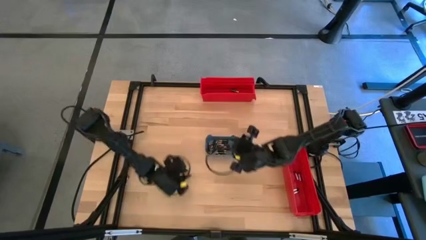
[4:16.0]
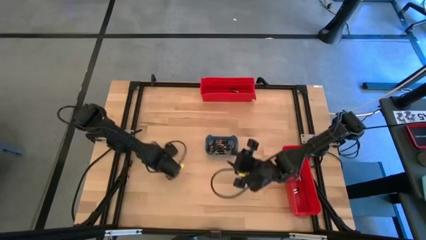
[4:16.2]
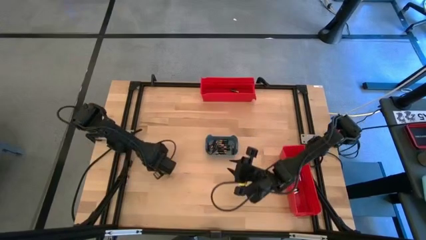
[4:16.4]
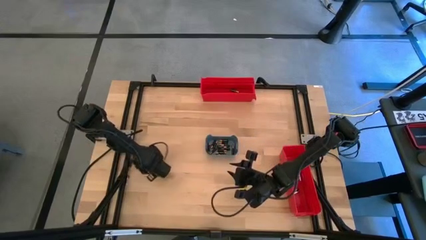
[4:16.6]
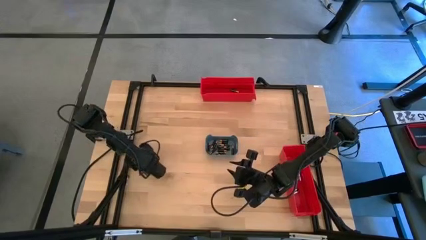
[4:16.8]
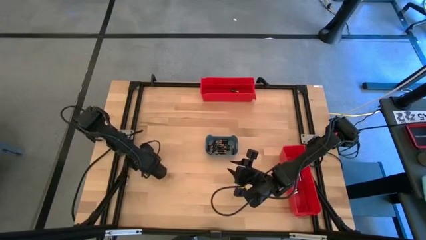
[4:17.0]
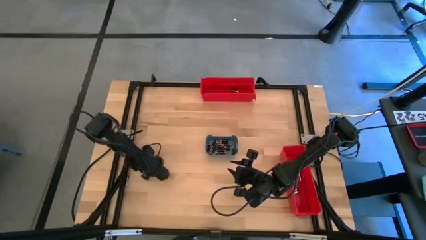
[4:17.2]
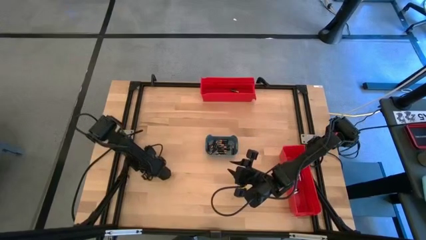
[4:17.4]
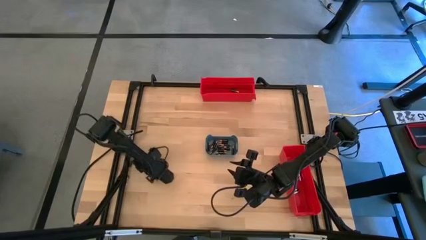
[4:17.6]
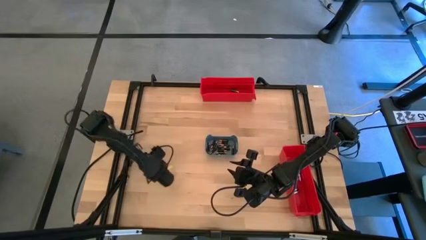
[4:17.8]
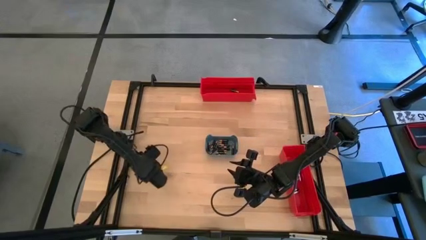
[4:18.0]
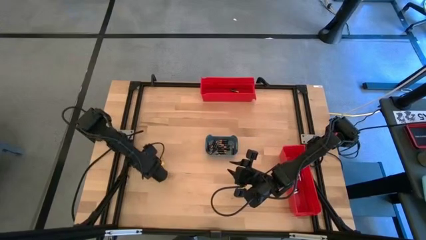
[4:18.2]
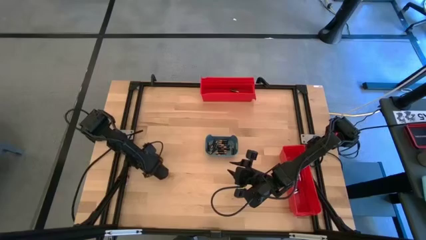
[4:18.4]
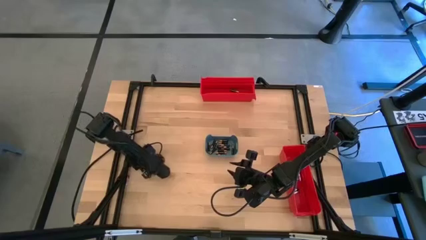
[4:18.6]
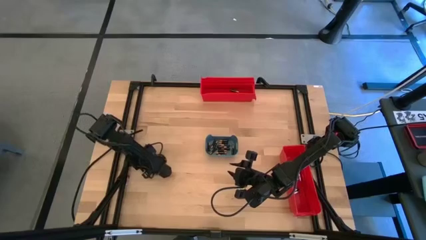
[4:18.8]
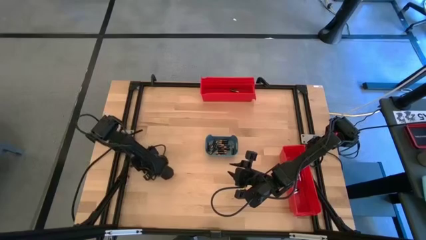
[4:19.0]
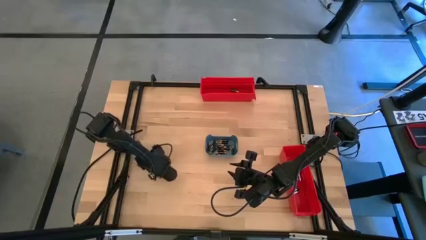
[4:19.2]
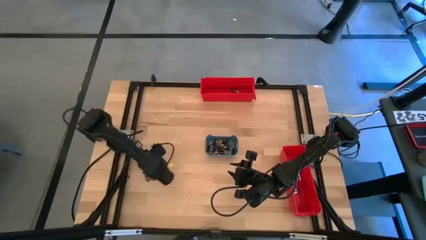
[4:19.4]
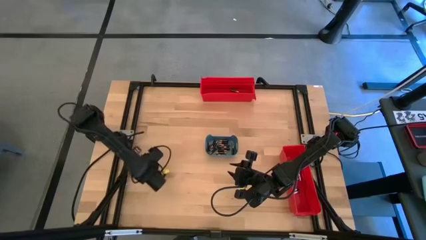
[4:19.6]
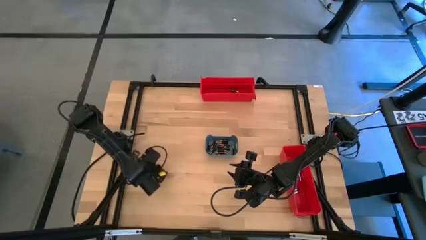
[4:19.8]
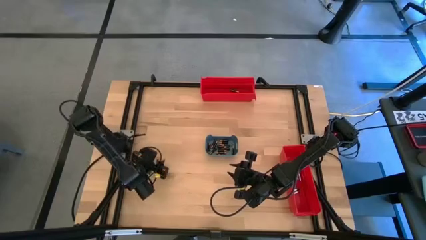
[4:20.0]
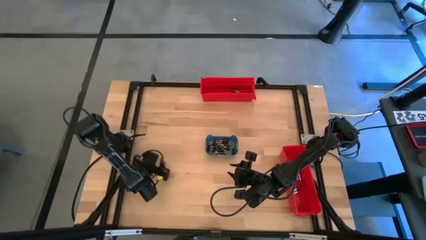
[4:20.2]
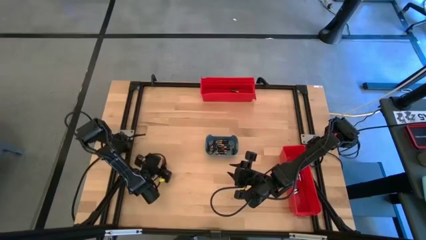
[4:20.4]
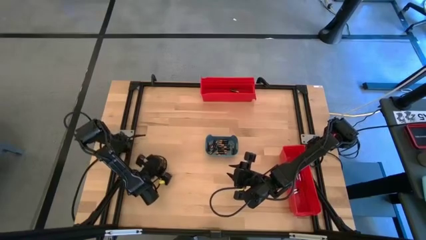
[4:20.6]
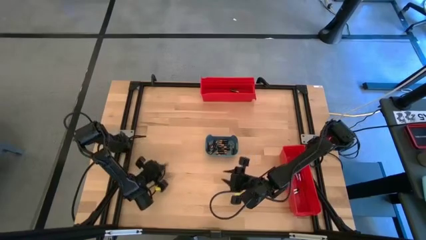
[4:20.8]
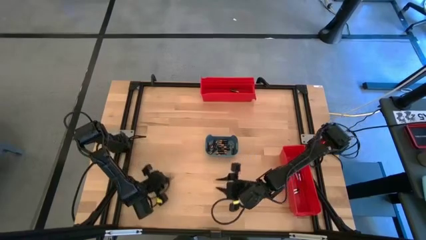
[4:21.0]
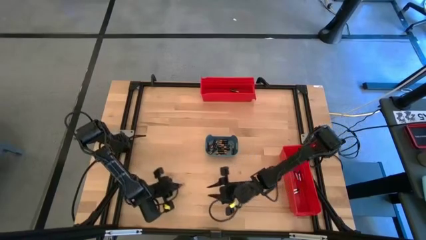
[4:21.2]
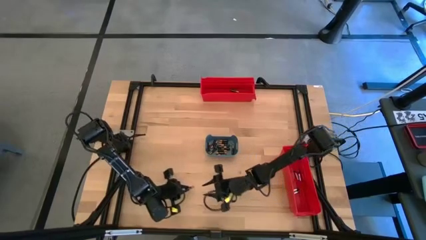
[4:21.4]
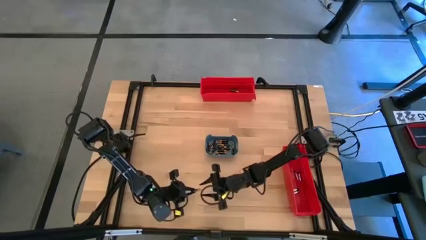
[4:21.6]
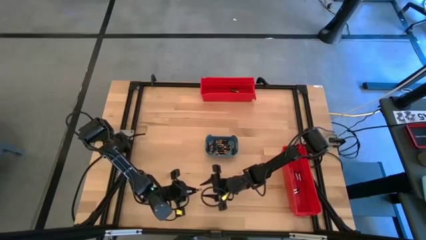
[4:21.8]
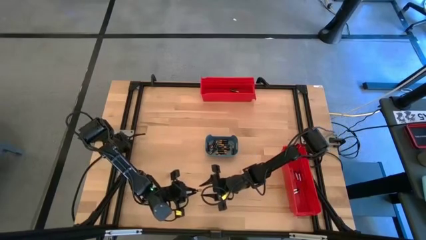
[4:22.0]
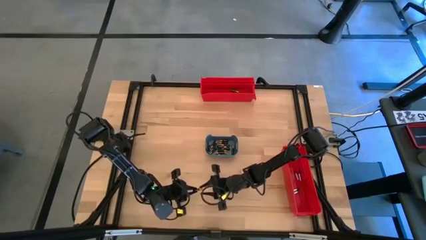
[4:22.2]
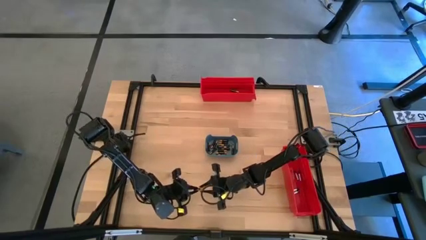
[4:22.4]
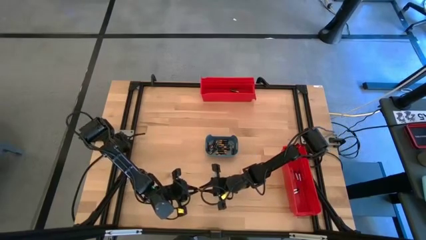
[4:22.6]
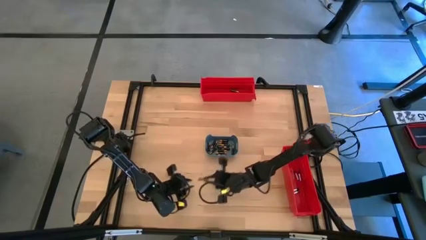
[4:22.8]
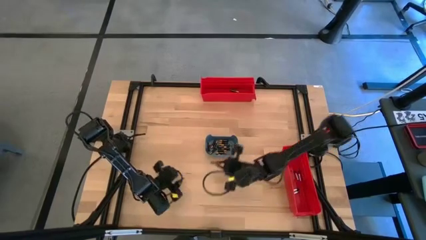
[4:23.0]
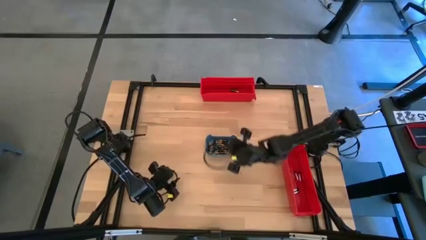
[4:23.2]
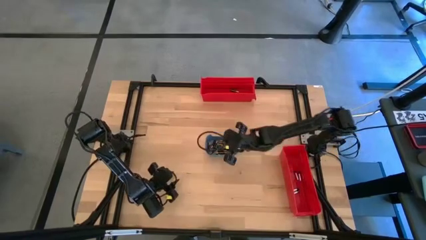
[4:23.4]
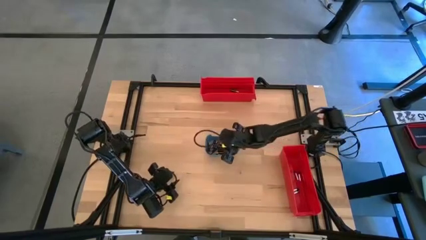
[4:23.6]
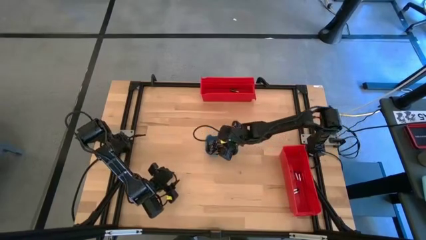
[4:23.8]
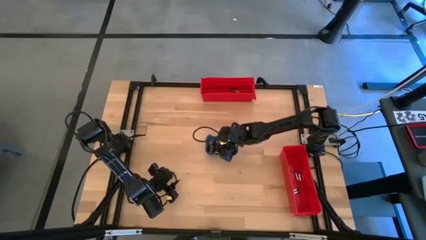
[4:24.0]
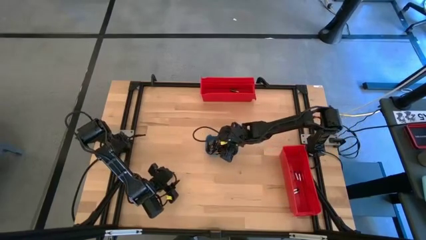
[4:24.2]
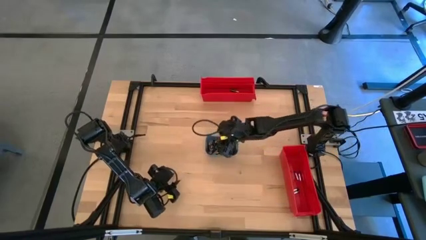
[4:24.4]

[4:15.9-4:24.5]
Task: Sort batteries
Put the black battery into the blue bin

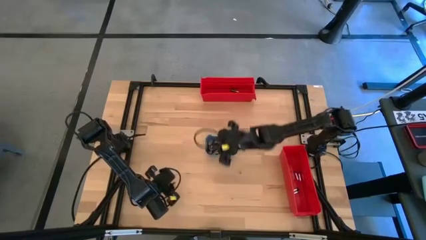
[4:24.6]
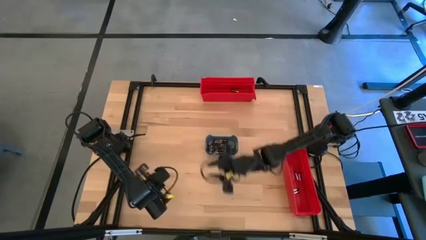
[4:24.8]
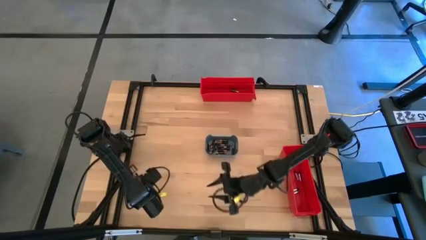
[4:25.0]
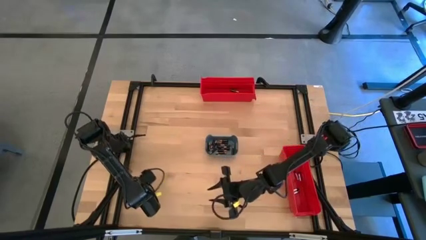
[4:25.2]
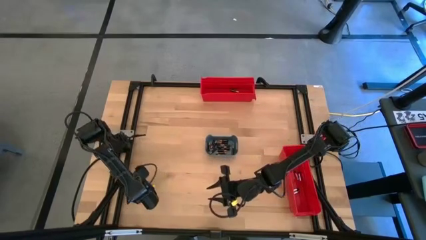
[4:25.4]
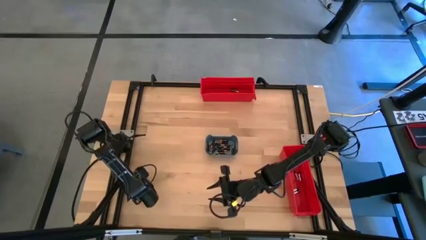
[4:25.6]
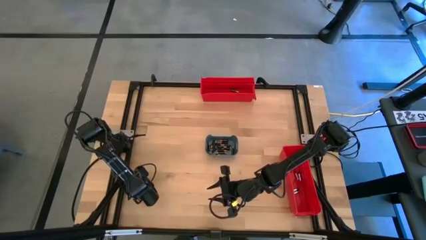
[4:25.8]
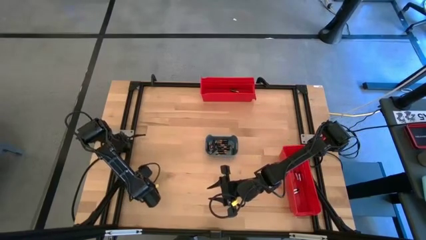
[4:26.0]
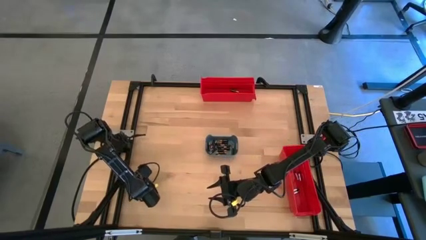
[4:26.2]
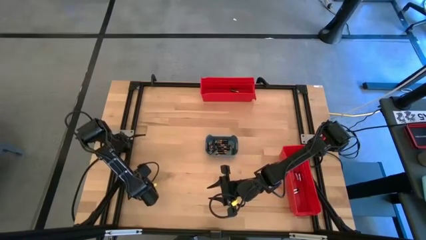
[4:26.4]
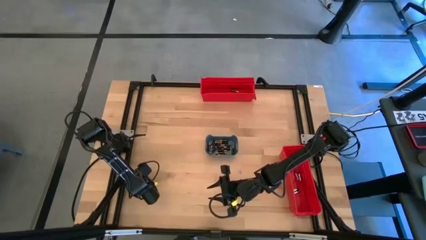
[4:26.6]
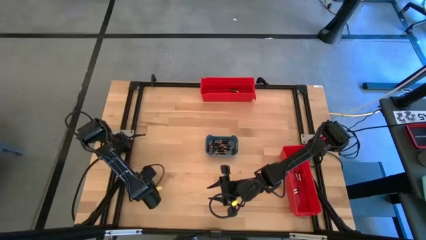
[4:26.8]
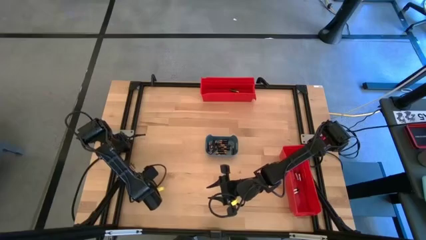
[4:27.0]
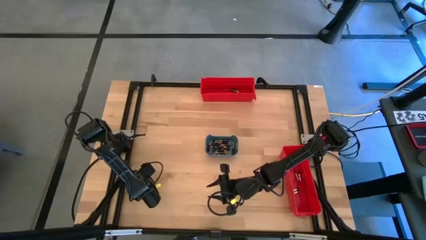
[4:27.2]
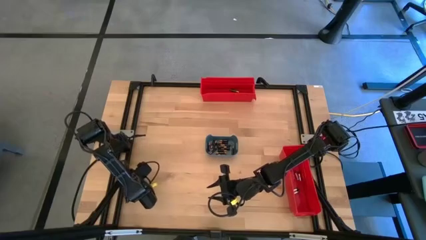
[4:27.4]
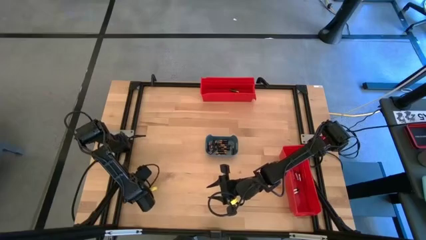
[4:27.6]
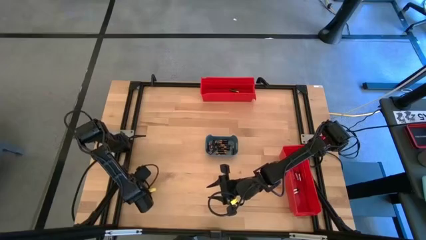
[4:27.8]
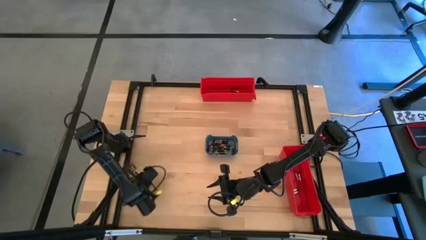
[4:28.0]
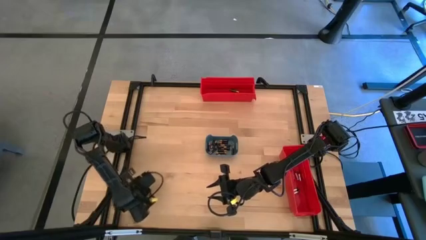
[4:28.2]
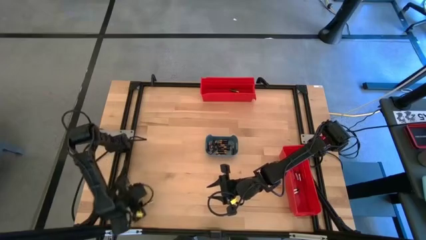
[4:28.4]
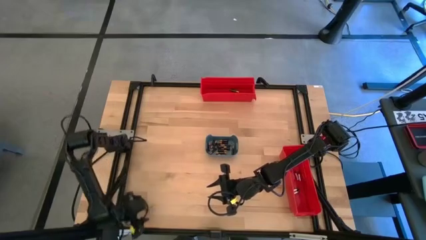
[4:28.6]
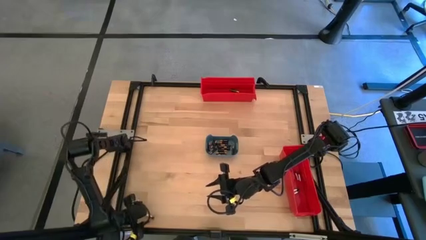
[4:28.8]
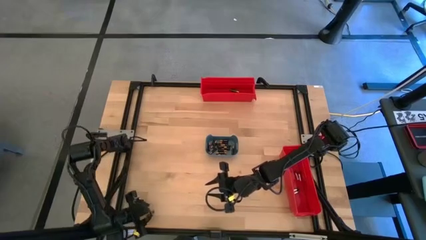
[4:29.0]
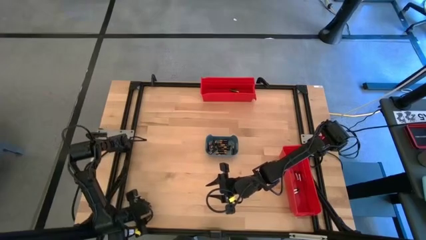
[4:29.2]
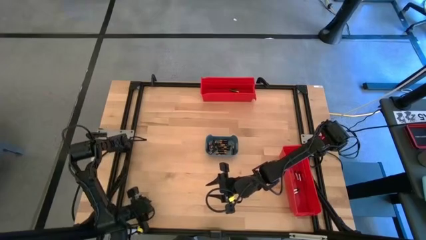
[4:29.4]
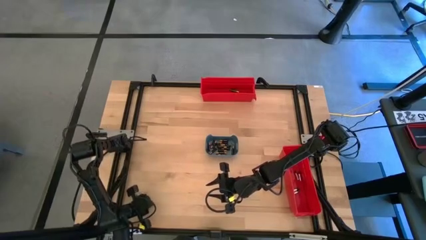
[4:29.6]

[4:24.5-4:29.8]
Put the silver battery into the bottom red bin

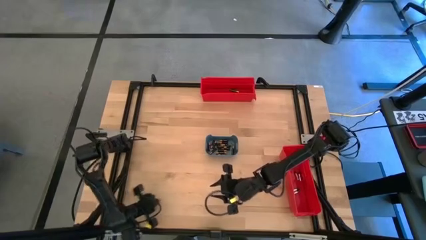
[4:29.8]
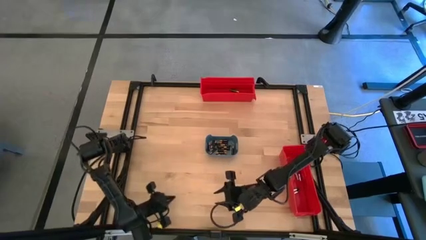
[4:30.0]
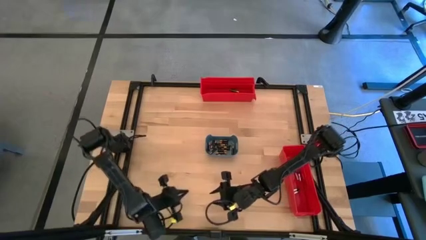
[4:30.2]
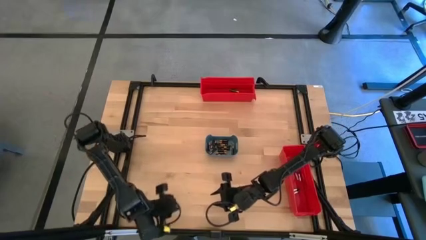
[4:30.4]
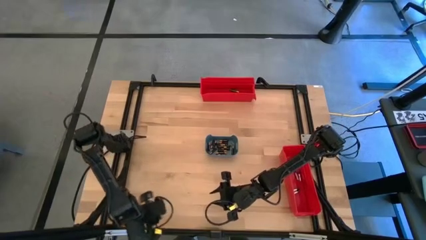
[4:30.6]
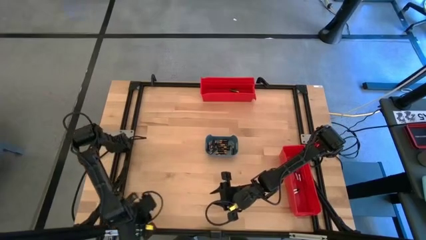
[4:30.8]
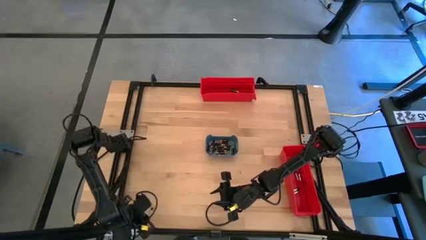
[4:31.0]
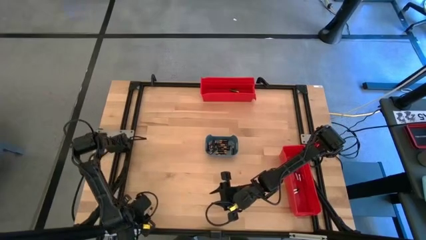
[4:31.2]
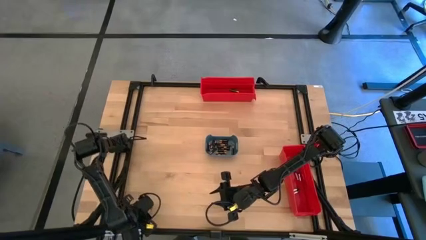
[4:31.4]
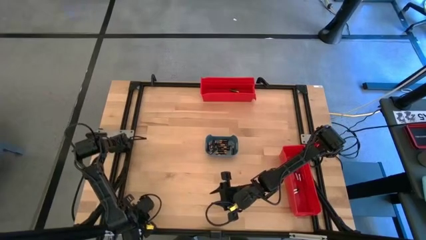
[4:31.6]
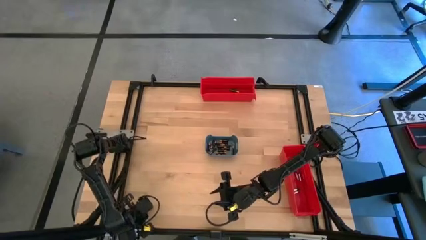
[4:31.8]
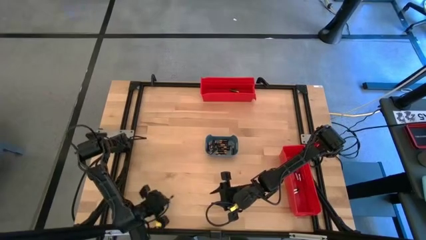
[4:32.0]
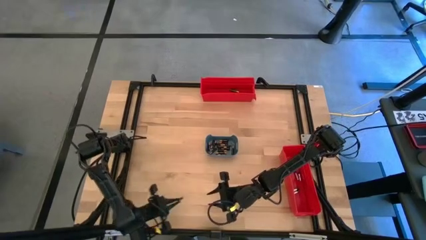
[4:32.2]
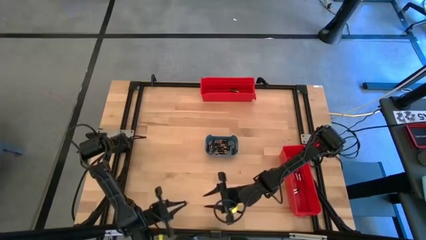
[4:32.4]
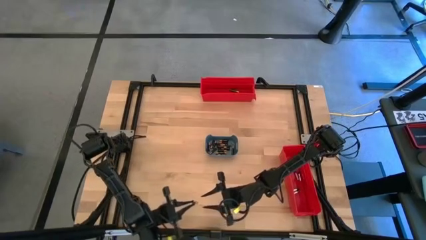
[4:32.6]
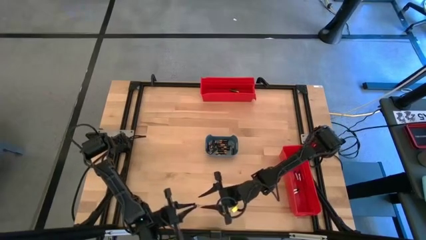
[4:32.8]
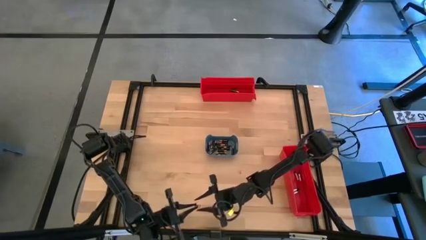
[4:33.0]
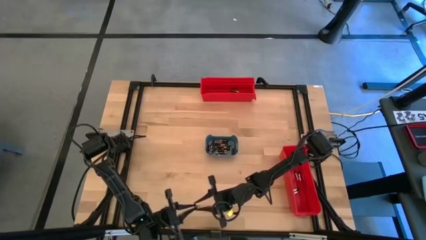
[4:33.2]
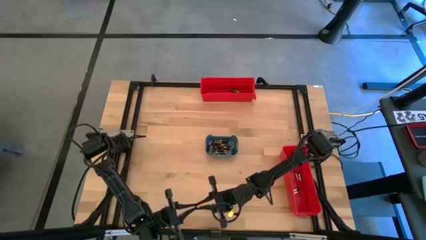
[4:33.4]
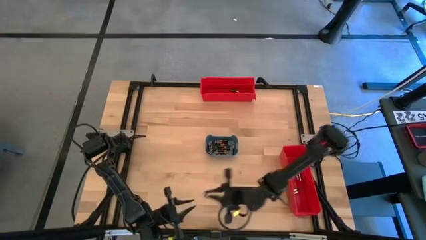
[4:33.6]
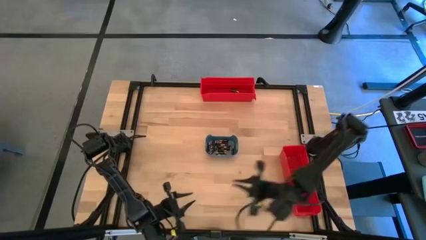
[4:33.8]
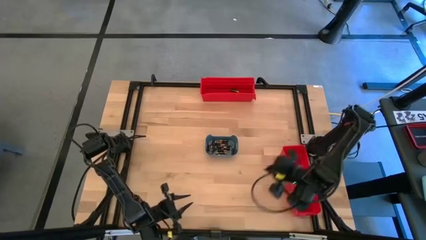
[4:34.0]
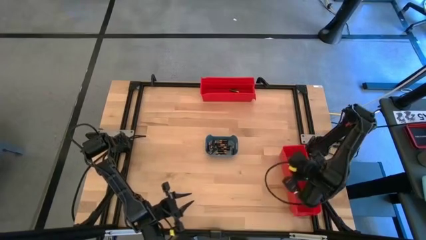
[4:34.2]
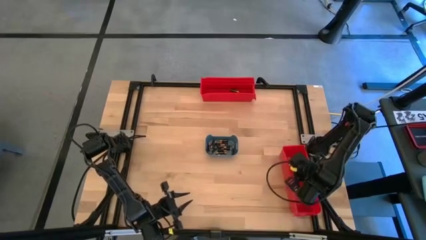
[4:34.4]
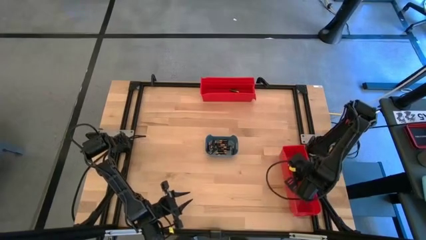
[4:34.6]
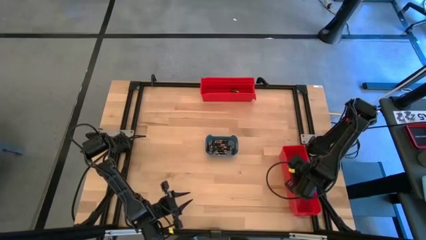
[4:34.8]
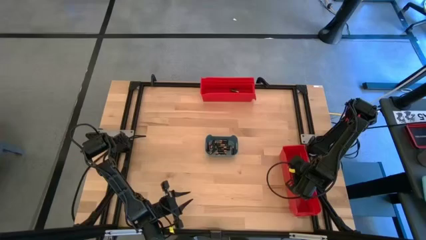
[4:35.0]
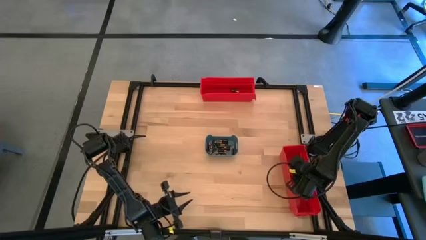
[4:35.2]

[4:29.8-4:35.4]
Put the silver battery into the bottom red bin
